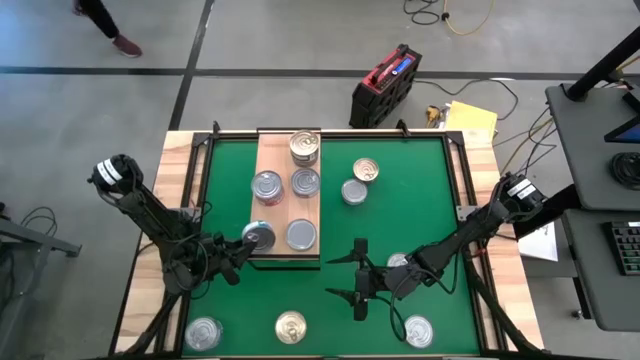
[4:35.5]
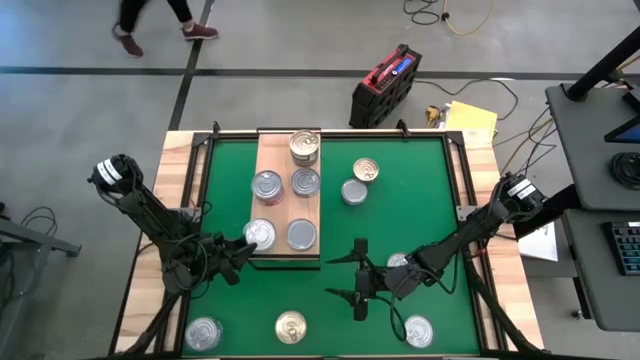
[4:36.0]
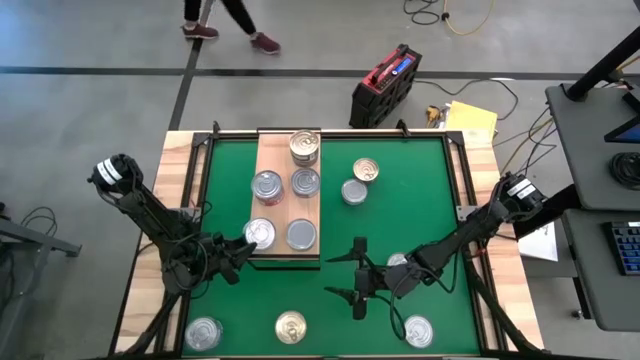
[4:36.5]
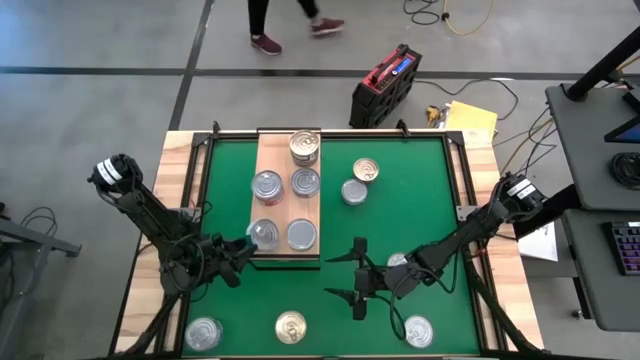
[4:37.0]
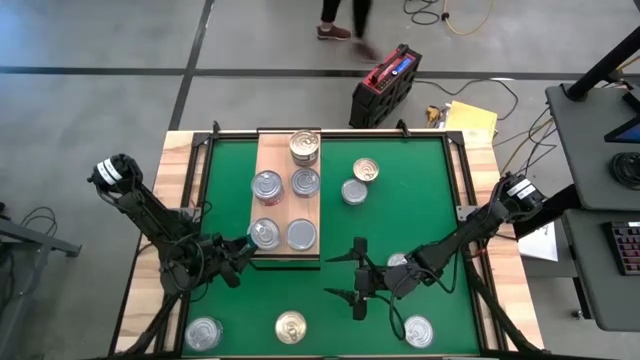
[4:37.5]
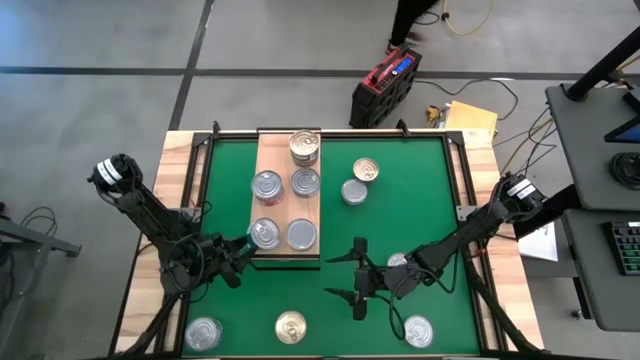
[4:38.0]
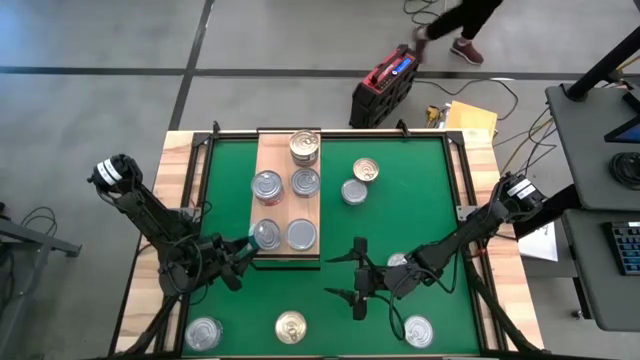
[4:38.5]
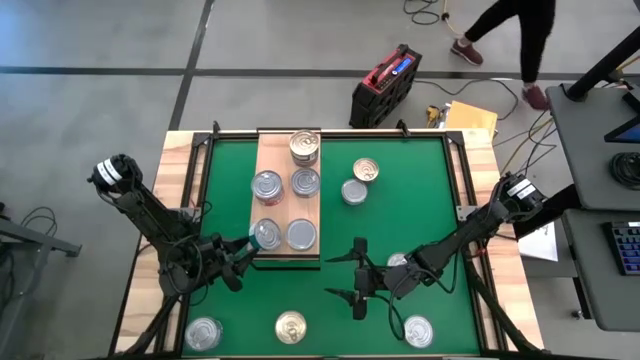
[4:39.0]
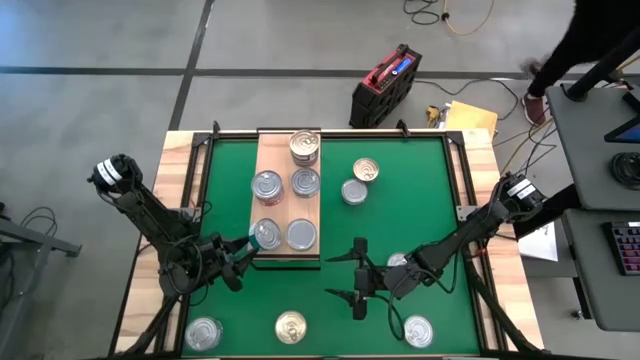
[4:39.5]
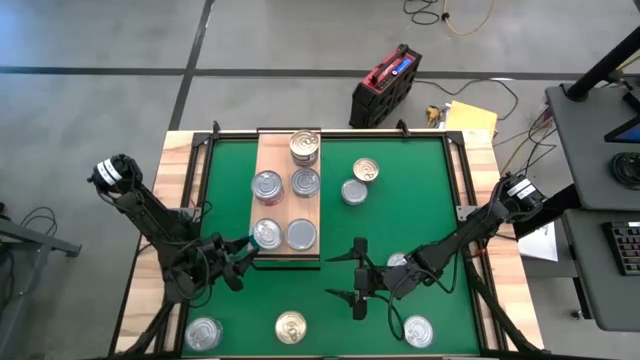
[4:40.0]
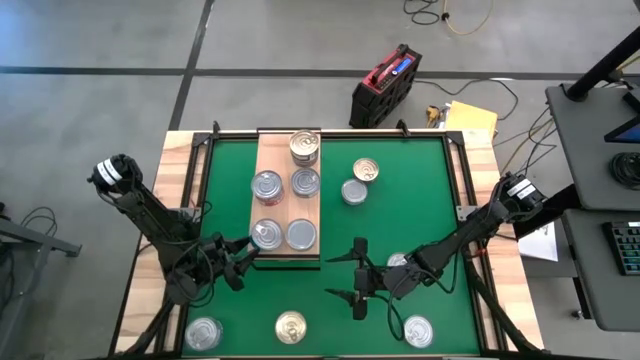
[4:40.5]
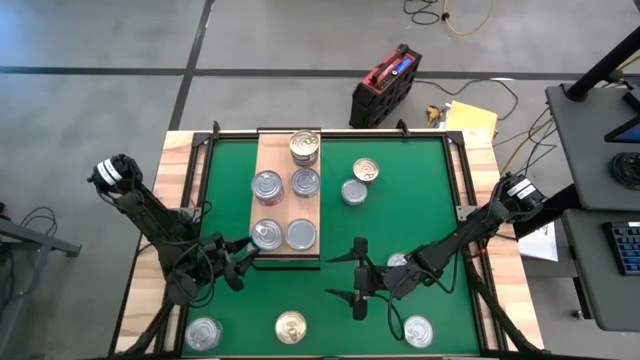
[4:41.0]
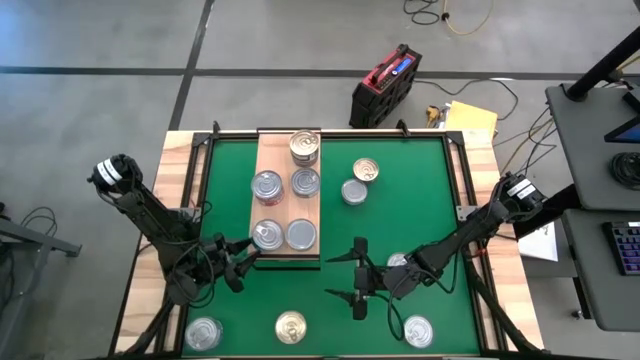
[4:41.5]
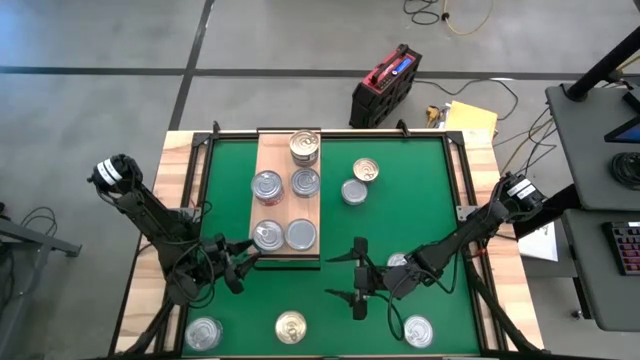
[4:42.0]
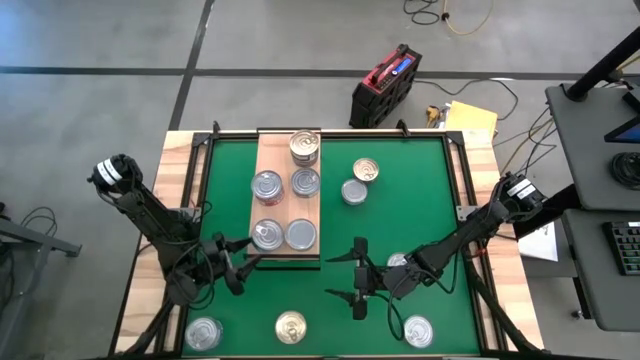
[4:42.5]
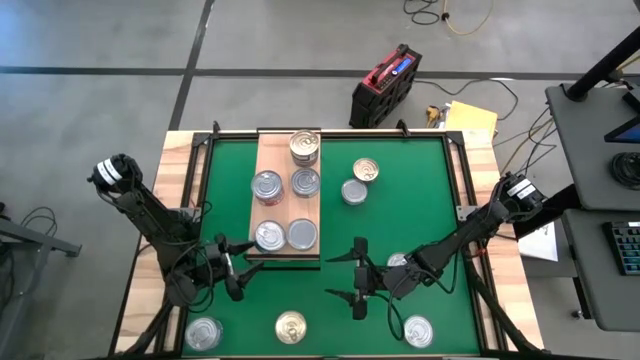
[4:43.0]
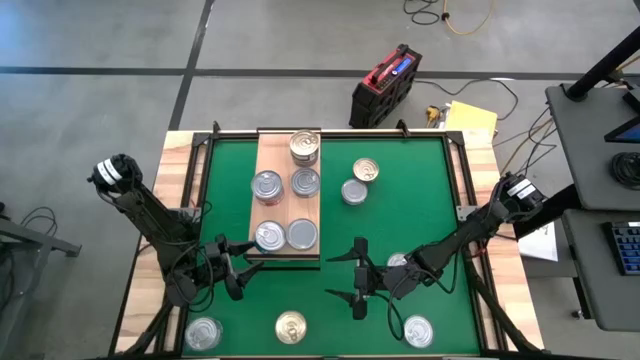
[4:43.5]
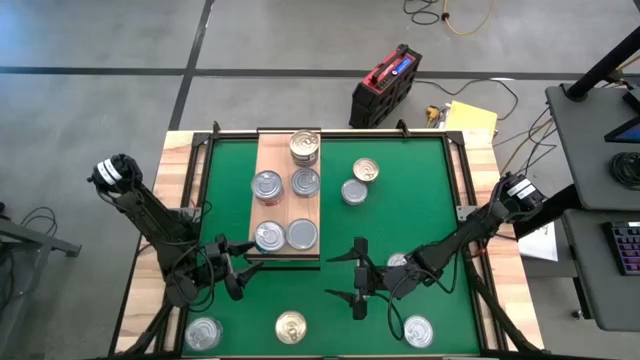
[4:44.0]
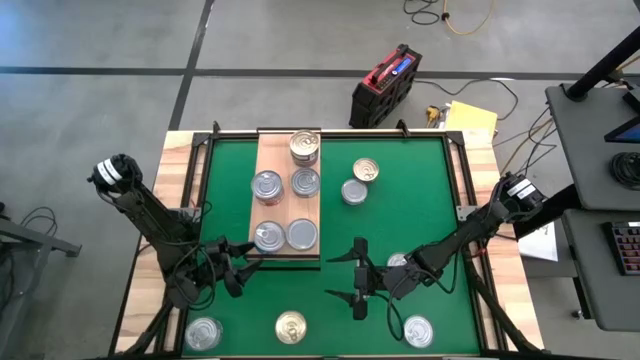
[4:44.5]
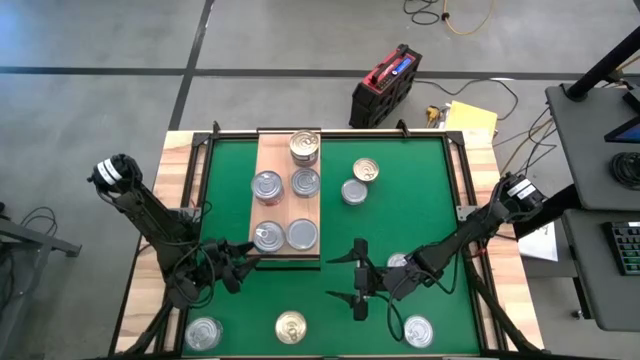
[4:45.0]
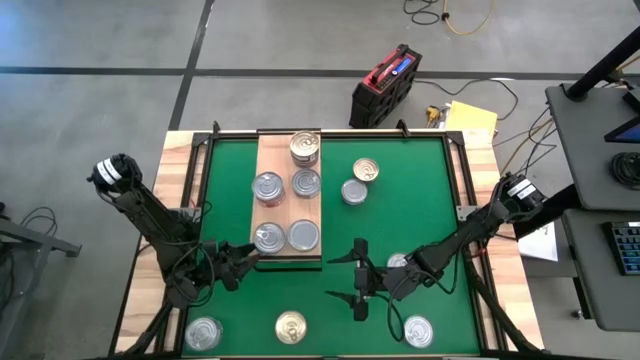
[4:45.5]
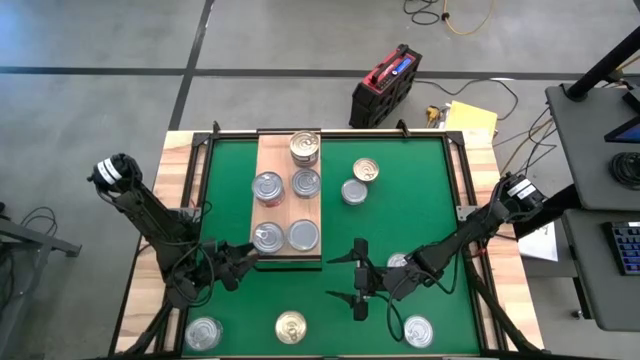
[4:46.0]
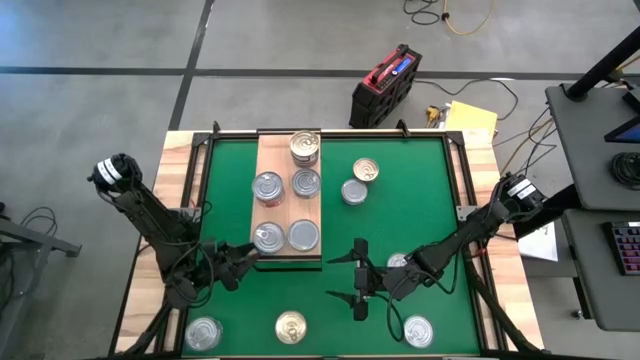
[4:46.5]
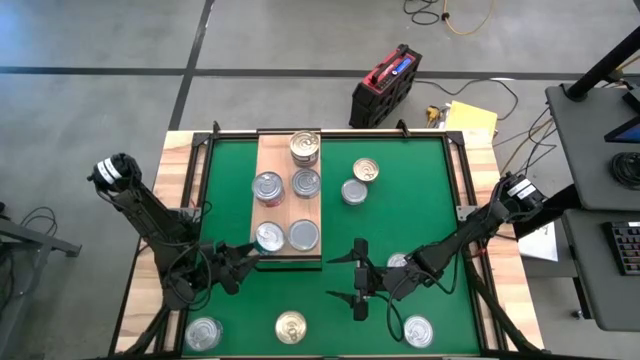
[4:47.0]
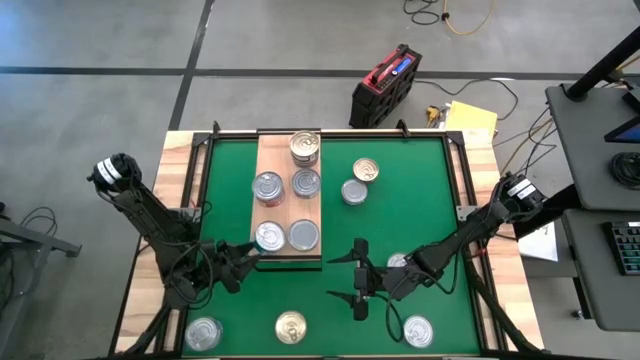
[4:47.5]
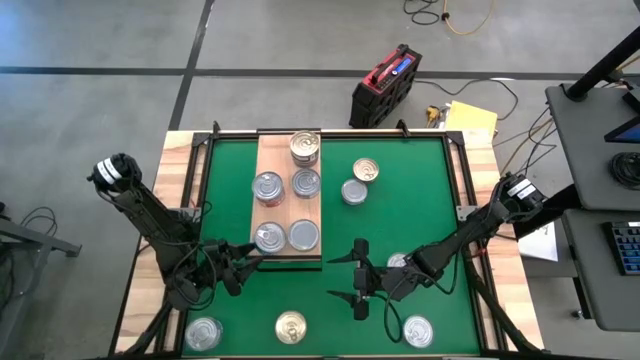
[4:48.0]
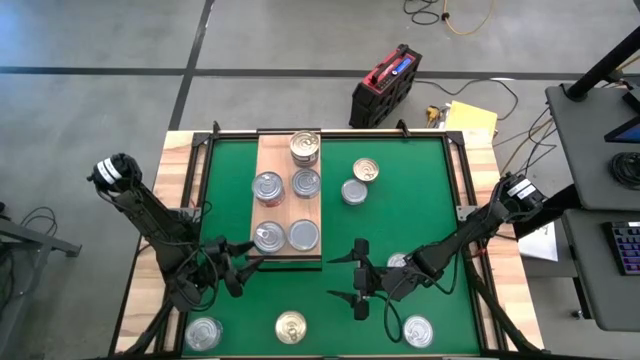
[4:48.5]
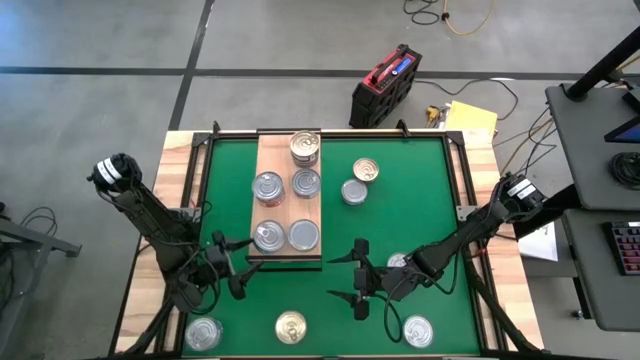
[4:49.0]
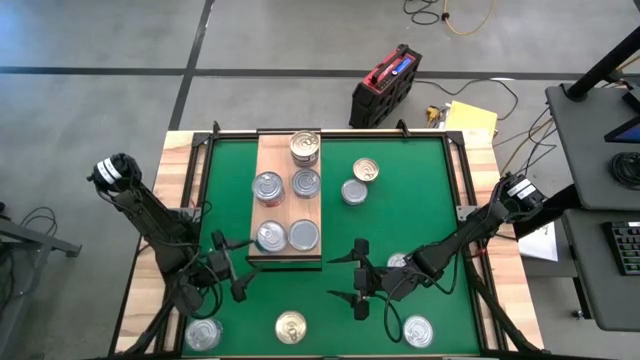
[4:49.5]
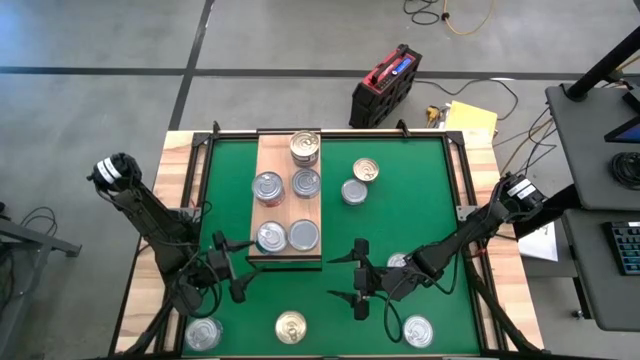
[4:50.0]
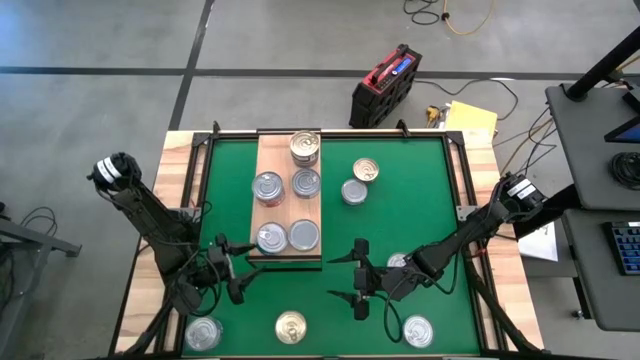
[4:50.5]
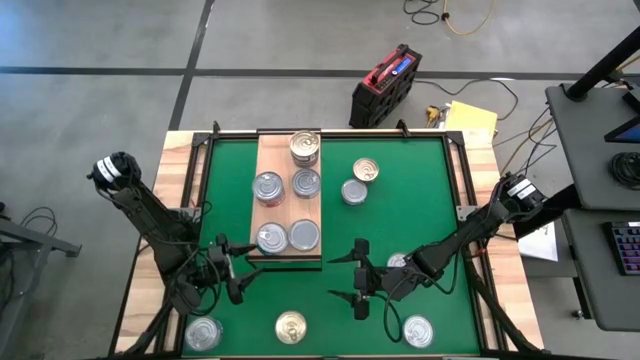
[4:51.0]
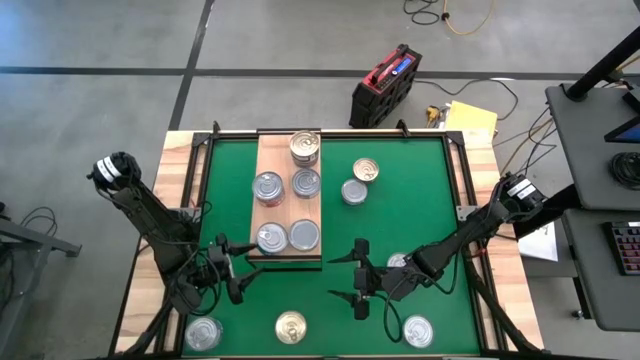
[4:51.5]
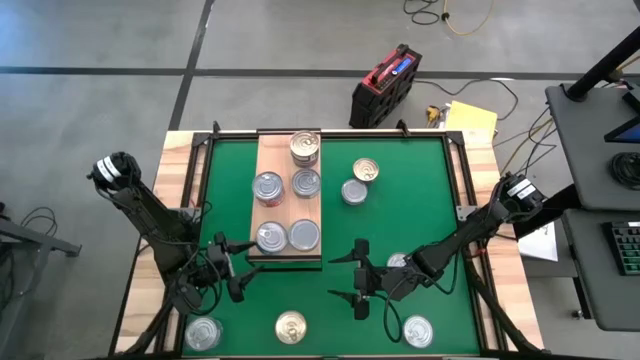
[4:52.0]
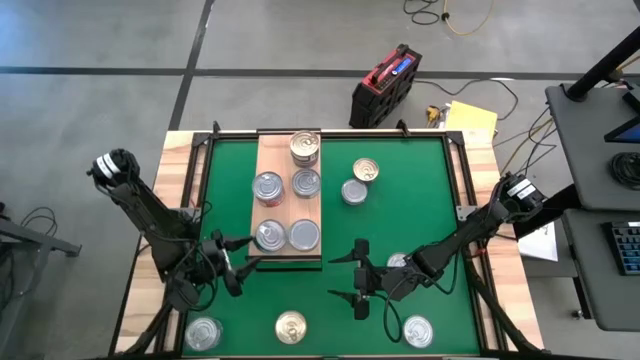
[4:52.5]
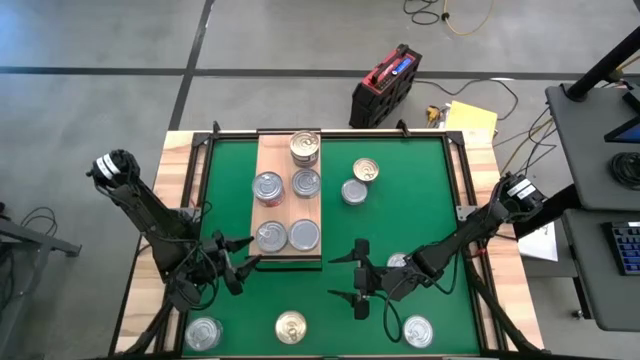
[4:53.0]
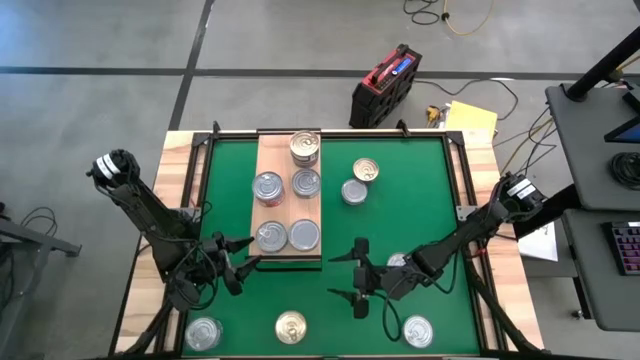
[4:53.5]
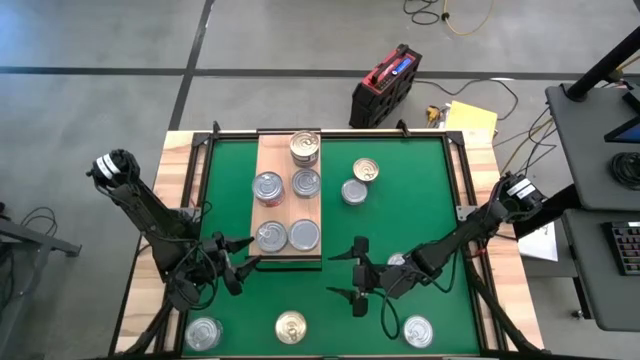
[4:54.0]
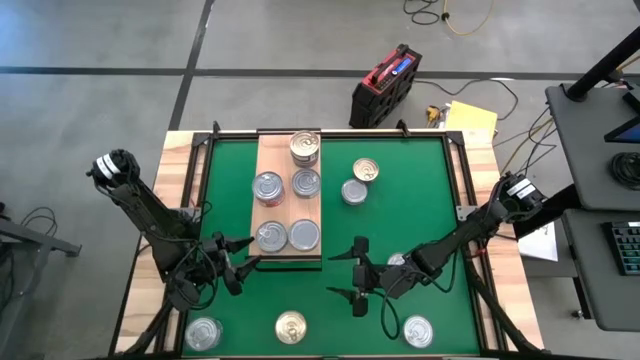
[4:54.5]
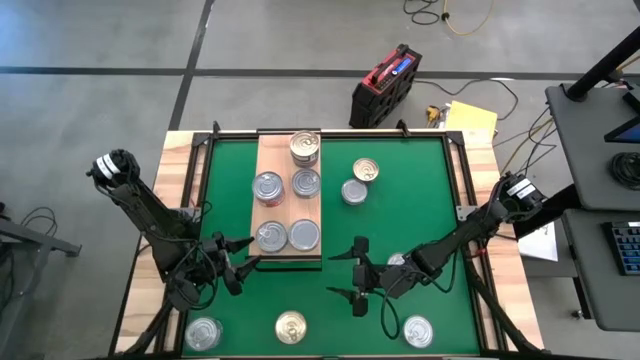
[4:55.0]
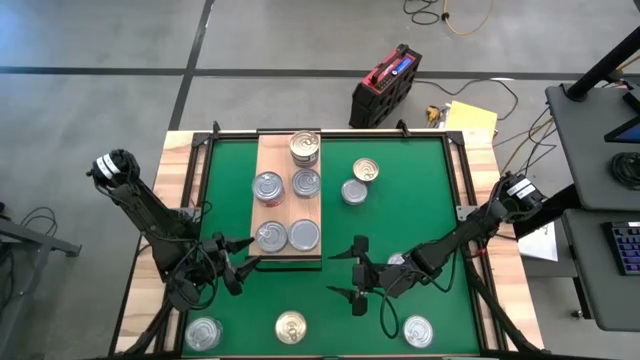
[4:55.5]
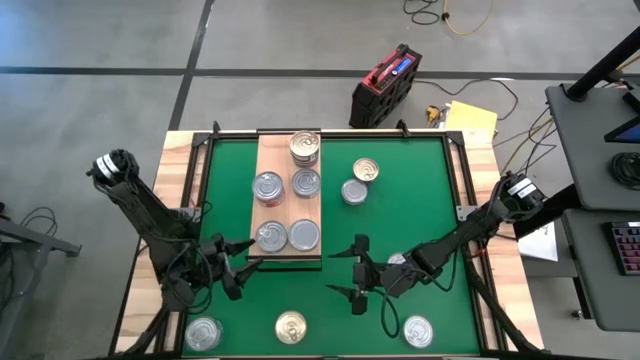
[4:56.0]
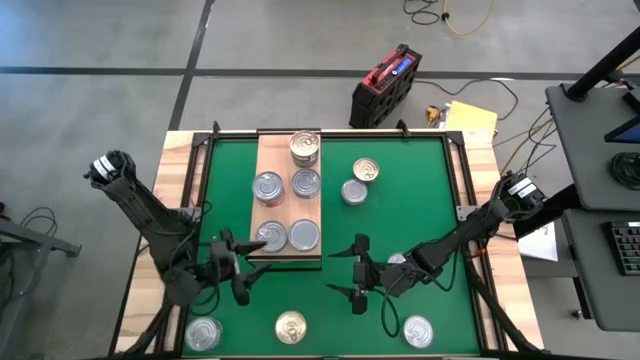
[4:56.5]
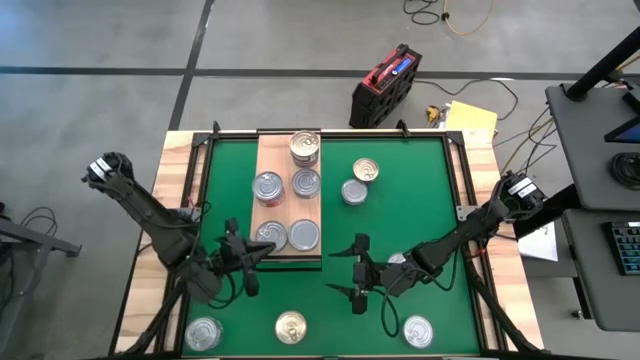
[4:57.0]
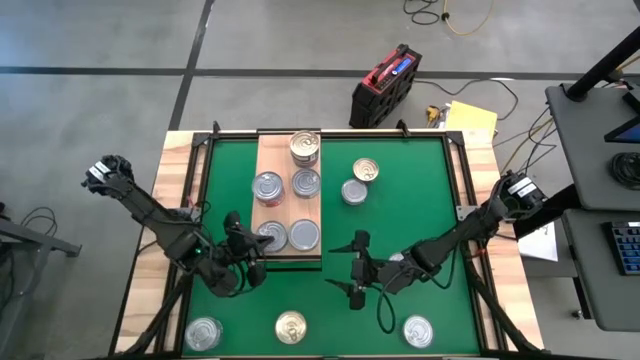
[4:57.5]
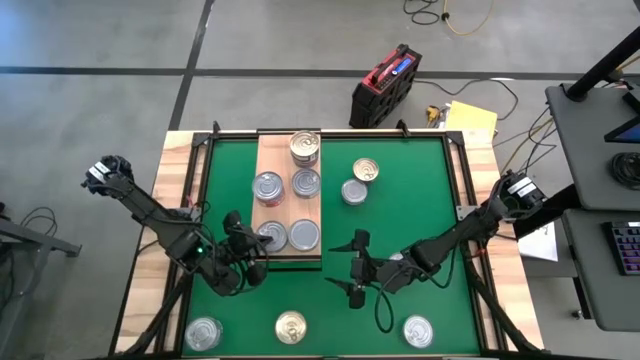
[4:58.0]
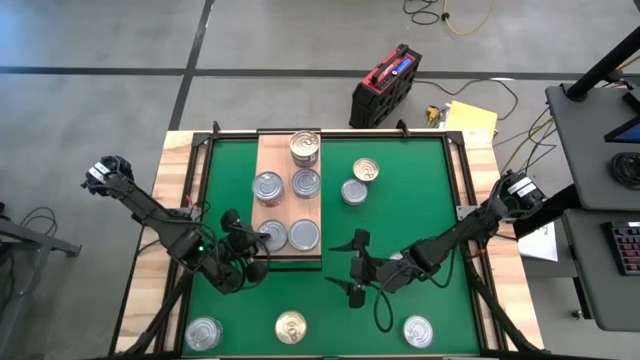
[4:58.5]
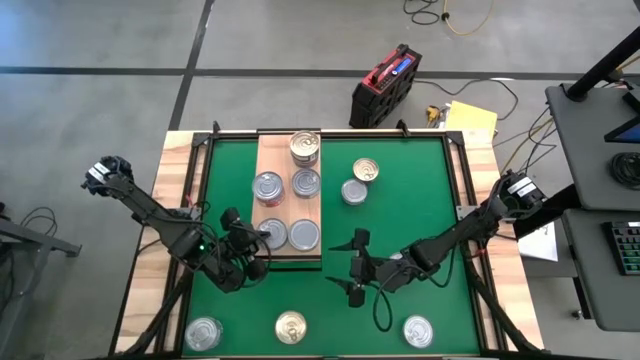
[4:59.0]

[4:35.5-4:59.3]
Task: Stack canned seafood by type on shelf
Put the green and blue tuna can on the shelf
